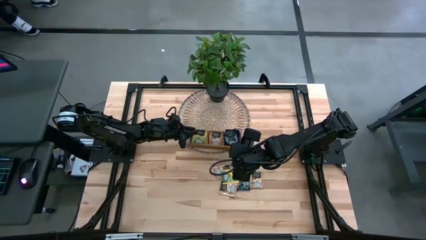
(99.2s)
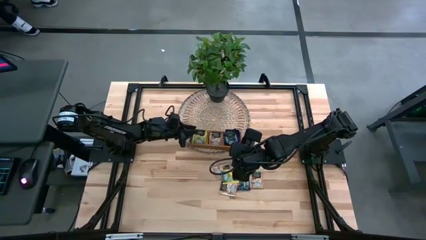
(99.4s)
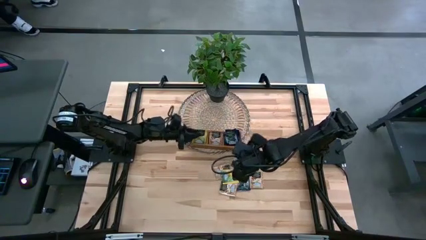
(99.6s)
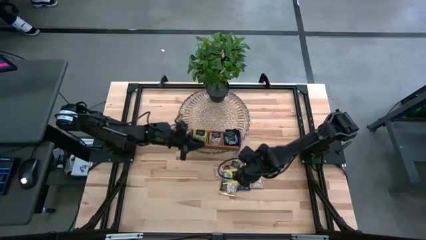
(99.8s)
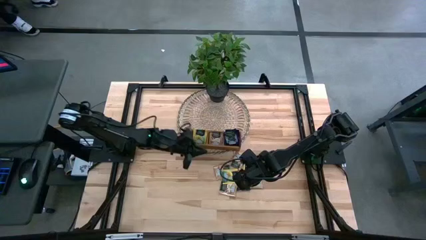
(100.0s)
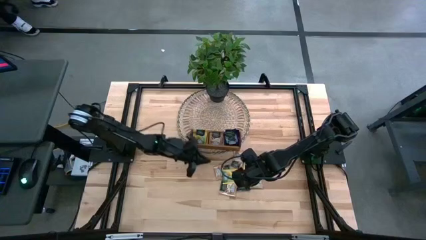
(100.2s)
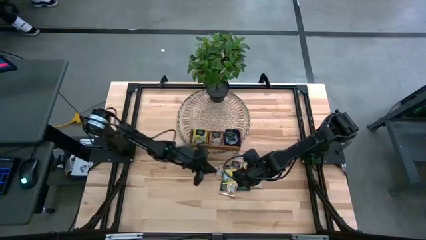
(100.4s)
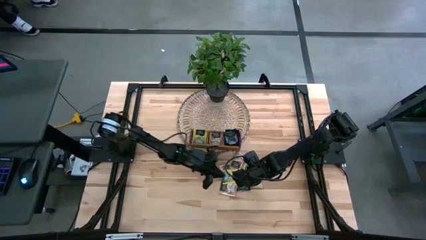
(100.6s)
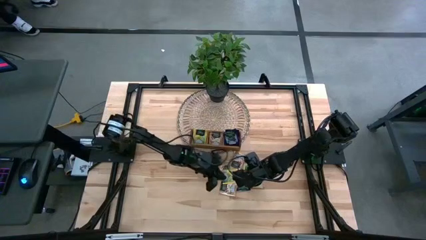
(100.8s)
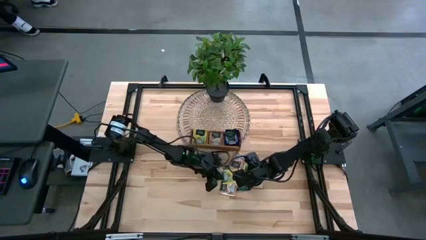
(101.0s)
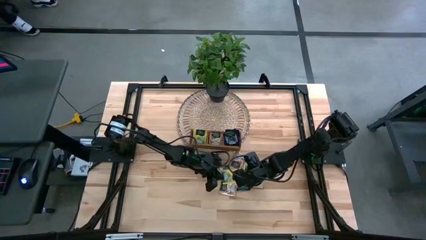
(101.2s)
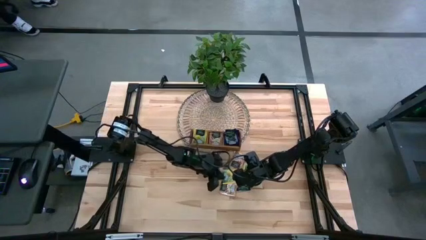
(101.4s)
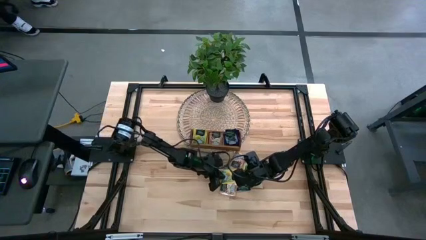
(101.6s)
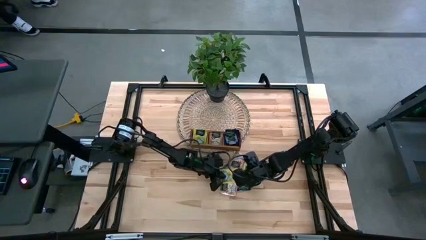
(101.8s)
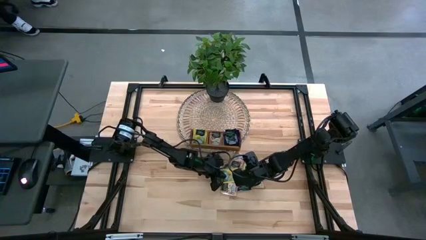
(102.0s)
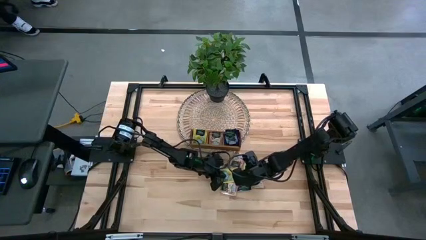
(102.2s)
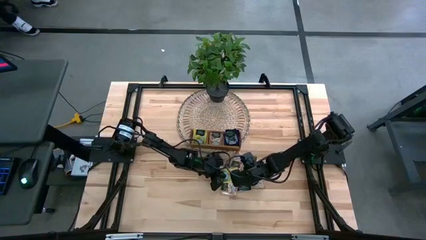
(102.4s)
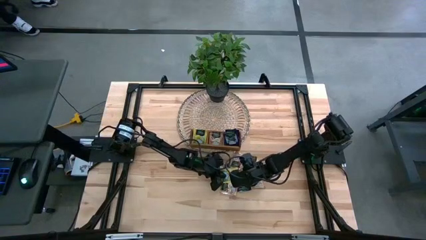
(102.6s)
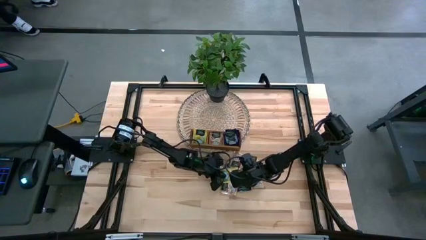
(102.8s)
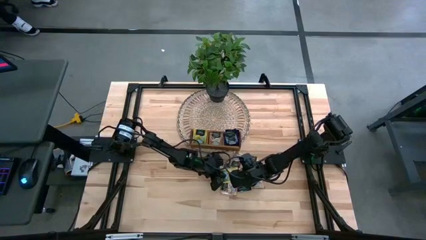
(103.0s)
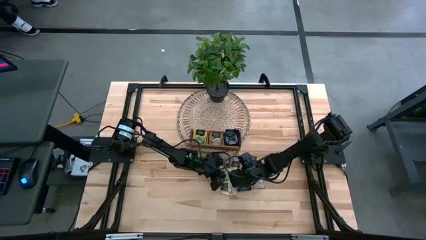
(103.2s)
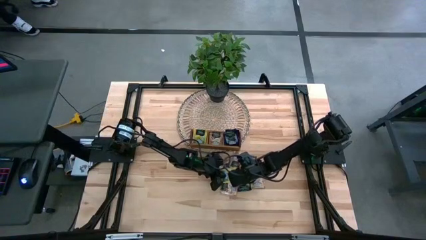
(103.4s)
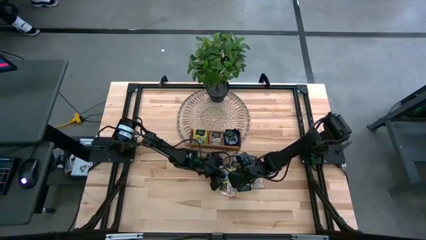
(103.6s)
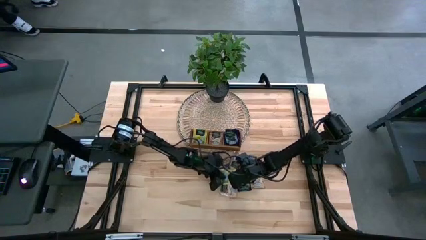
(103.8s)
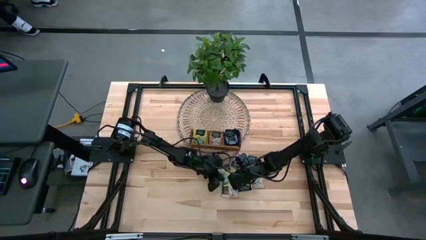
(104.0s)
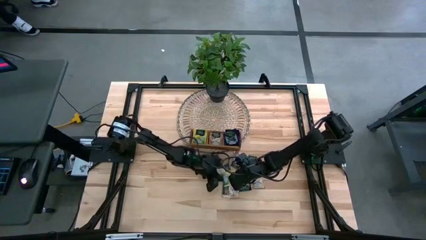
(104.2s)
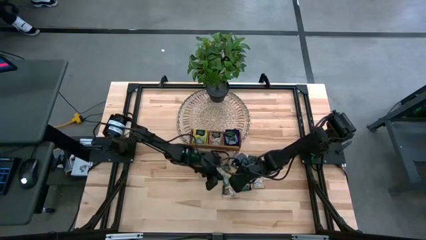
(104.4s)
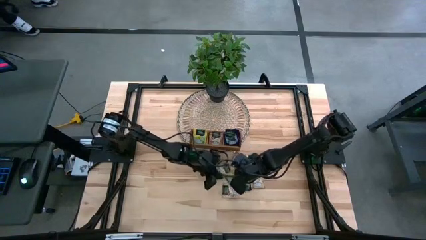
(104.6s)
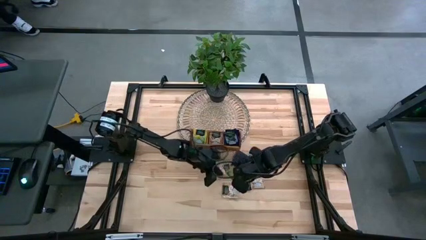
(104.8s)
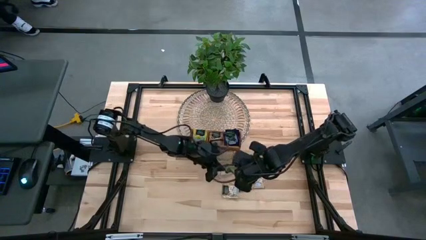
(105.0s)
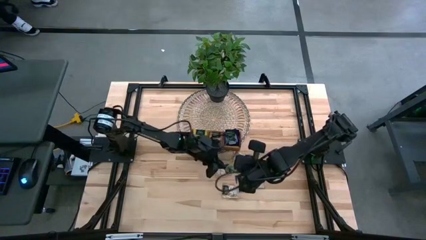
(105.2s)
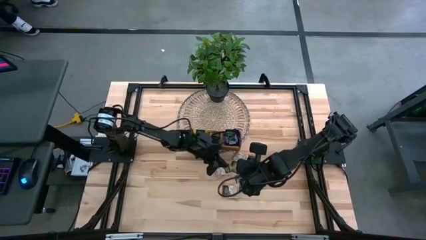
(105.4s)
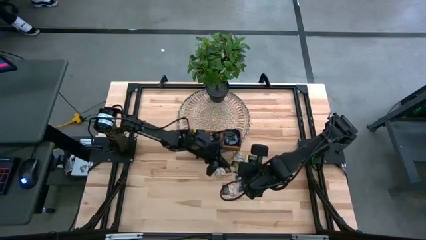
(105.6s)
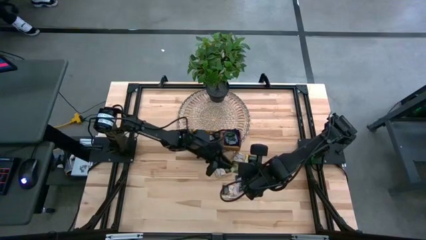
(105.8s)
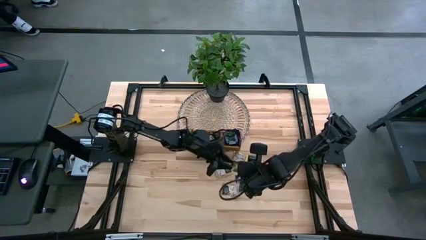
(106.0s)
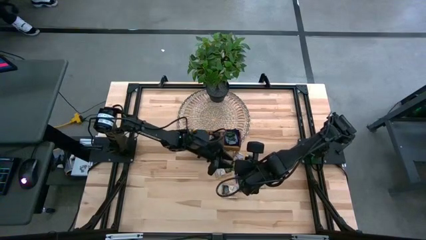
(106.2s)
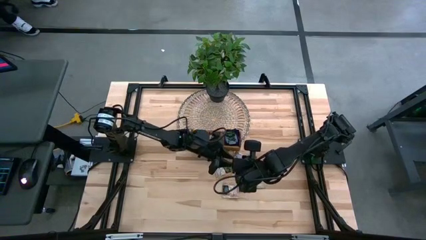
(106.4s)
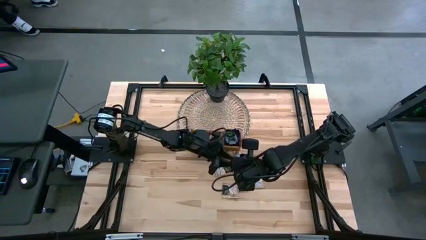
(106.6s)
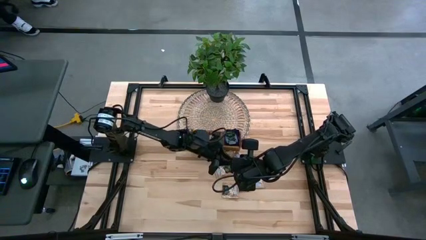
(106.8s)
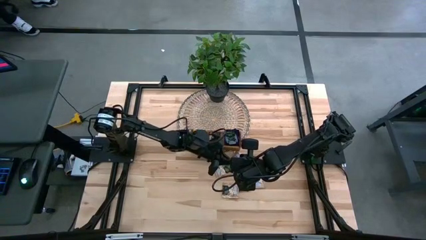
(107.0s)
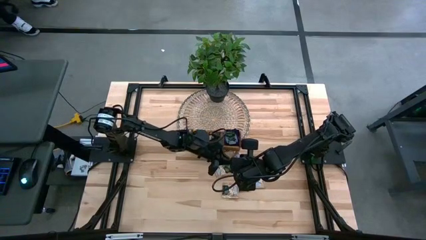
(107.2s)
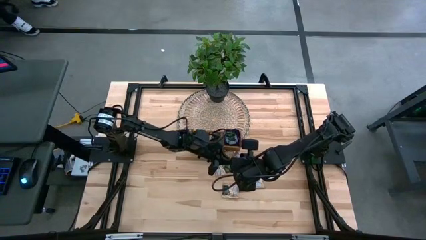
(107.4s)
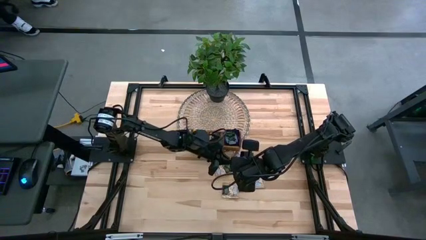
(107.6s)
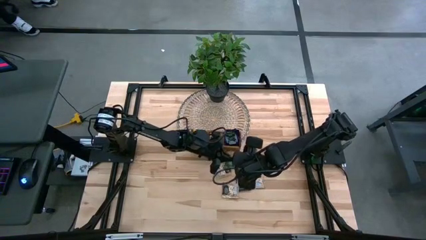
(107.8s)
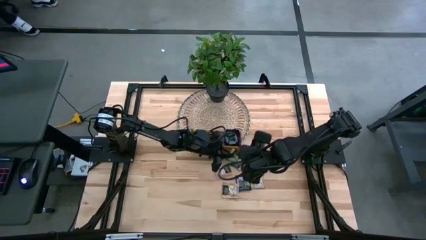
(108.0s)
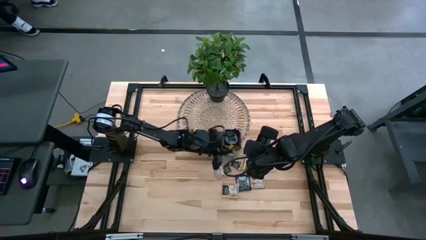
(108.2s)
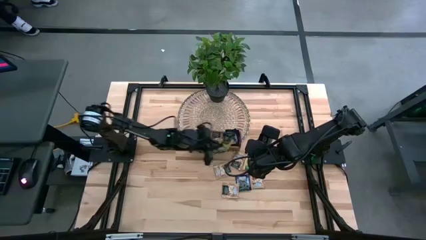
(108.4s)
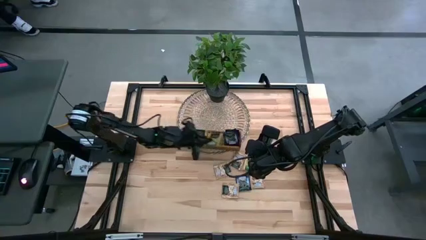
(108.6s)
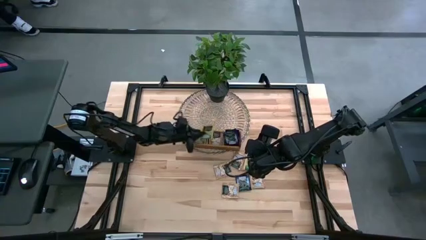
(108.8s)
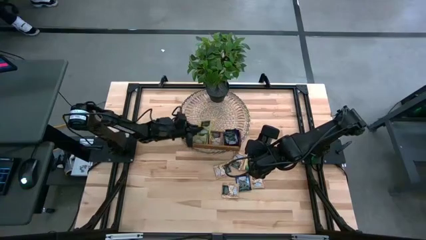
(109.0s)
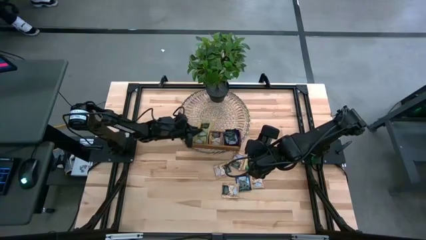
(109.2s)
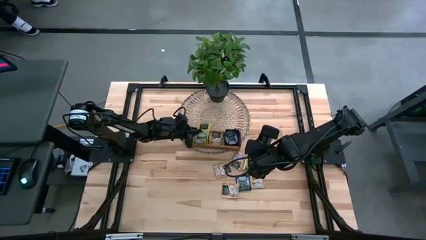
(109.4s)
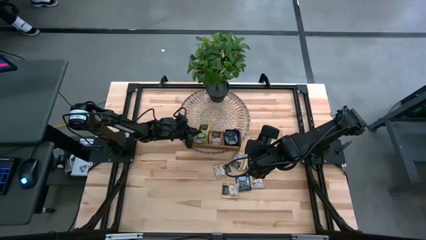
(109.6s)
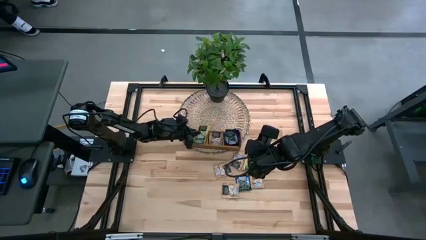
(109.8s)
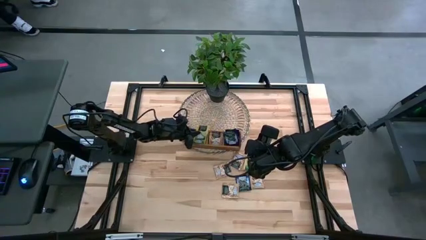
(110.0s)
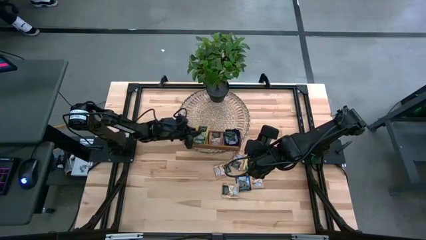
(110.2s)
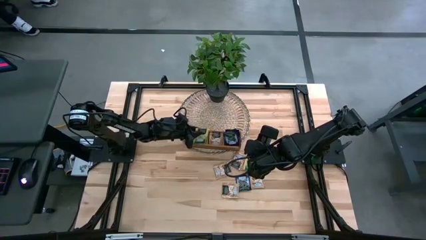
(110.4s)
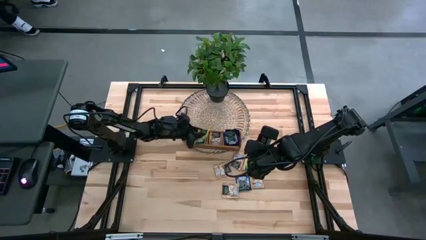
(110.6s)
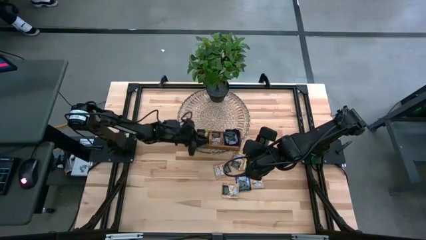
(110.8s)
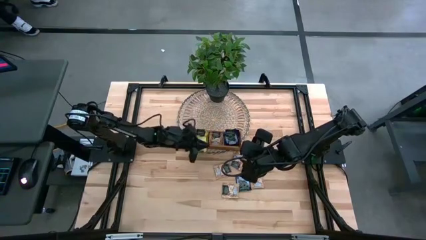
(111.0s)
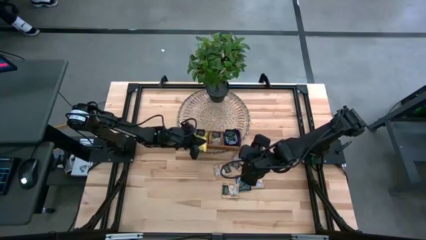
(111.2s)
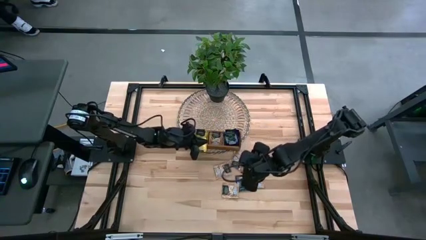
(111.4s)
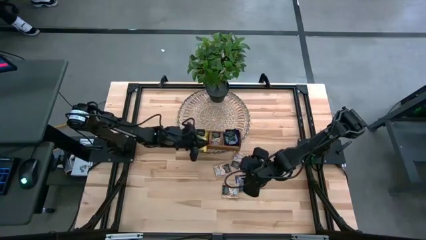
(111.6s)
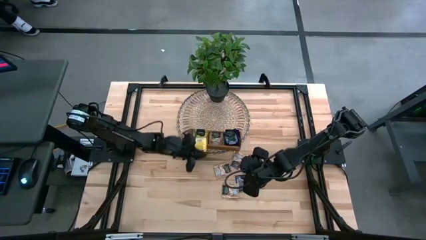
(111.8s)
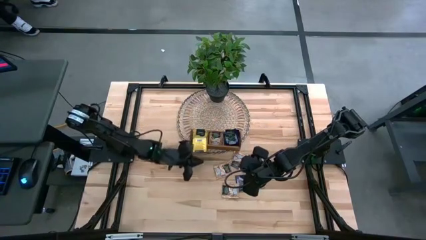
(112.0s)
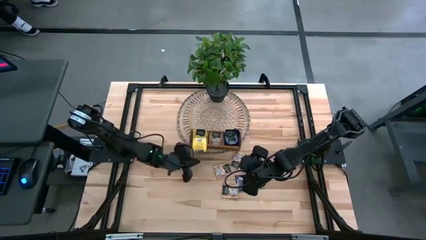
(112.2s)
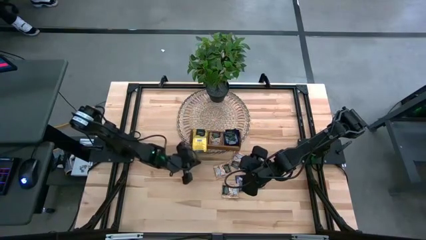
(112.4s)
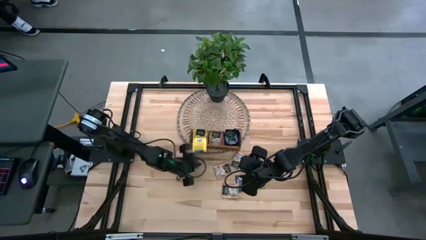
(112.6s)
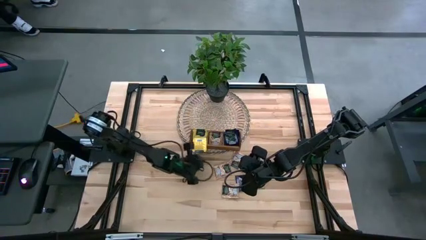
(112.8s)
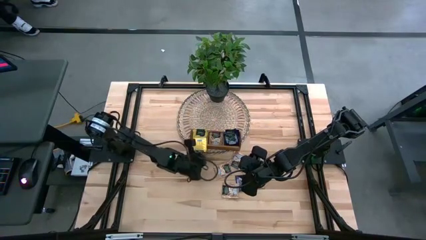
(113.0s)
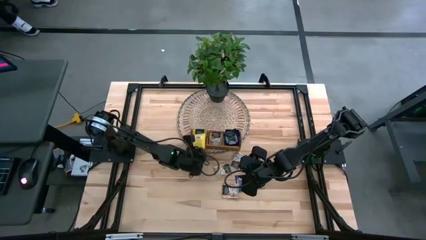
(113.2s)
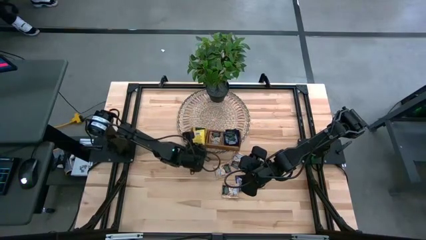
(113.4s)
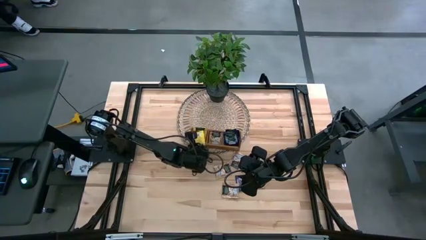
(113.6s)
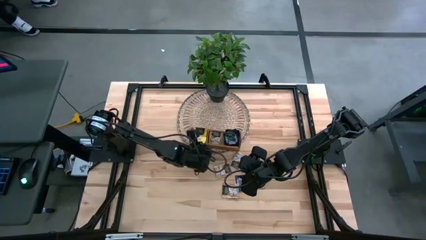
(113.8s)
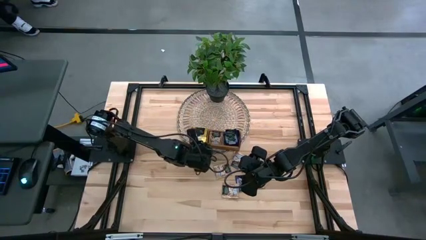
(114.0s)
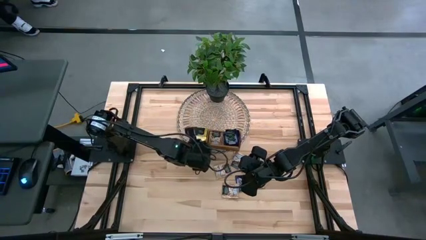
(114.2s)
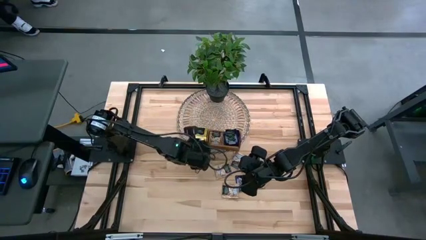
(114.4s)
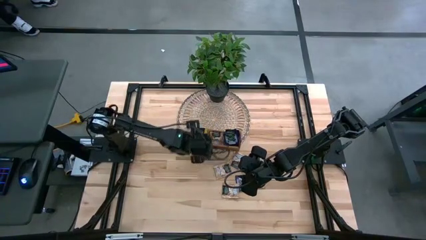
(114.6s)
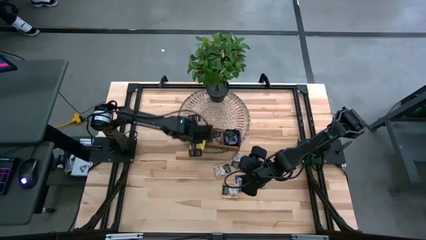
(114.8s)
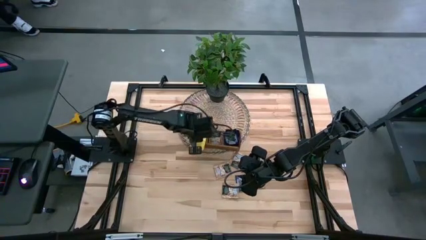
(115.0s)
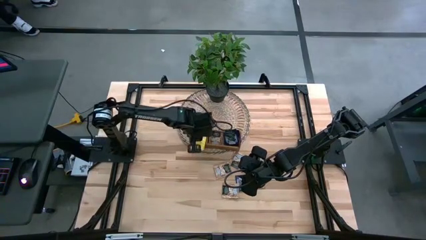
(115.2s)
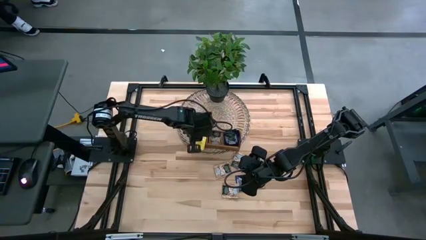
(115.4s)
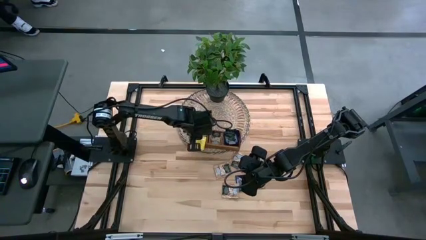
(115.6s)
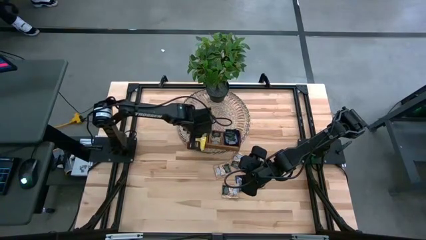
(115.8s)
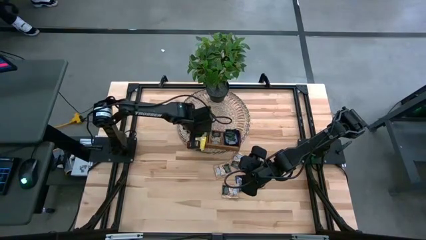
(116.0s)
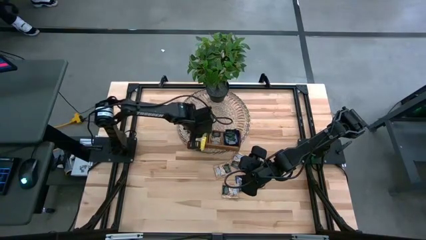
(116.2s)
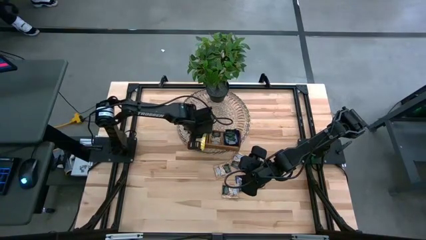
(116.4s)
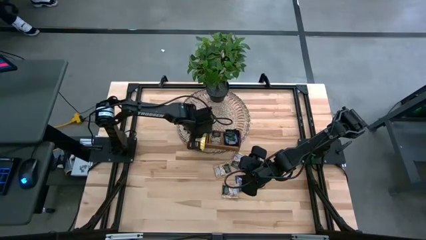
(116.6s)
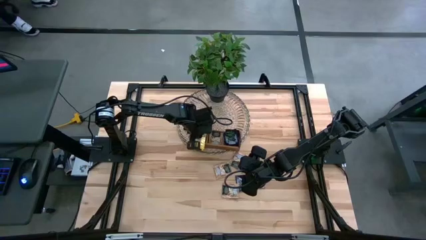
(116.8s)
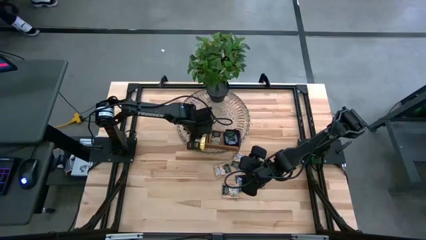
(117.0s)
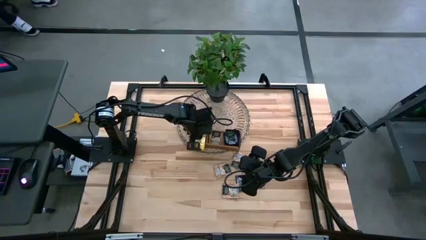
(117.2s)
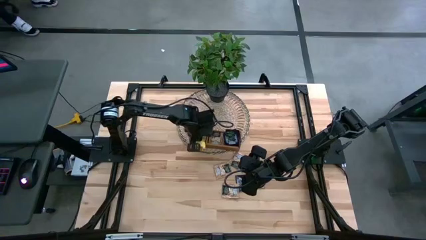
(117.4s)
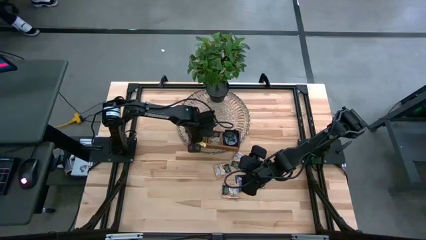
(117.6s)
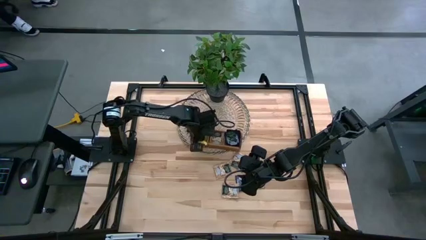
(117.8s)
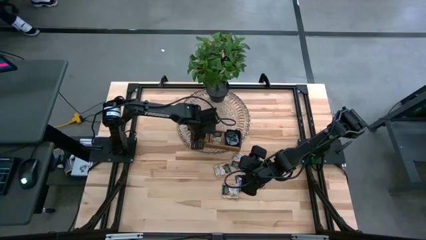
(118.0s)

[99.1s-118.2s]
Task: Pick & Place Tea
Put the green tea bag into the left section of the wooden organizer
